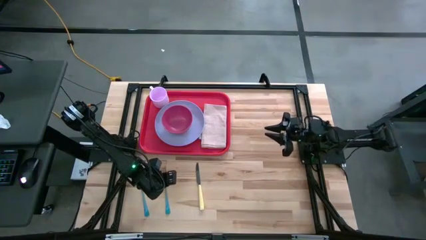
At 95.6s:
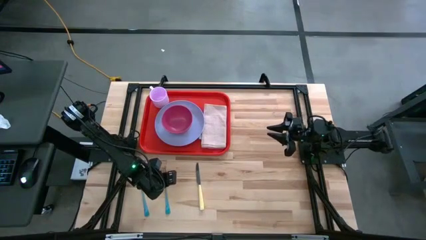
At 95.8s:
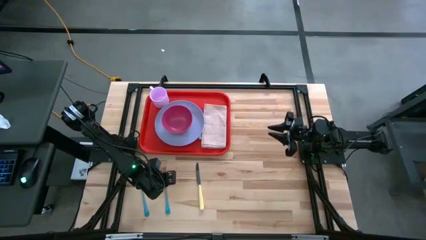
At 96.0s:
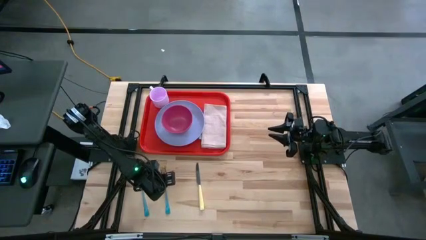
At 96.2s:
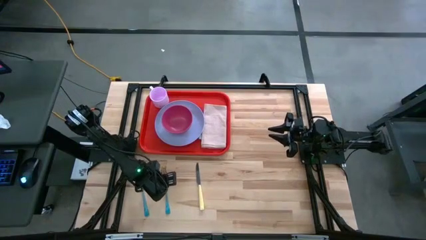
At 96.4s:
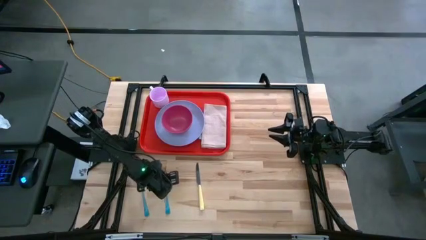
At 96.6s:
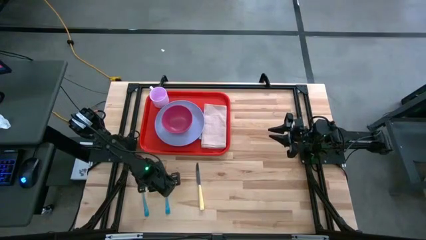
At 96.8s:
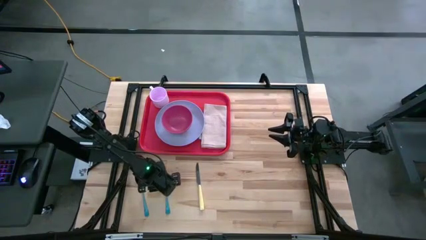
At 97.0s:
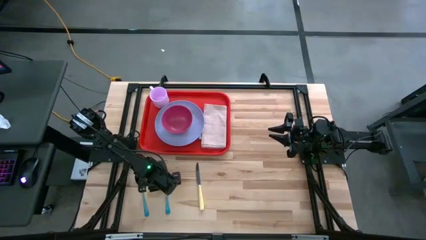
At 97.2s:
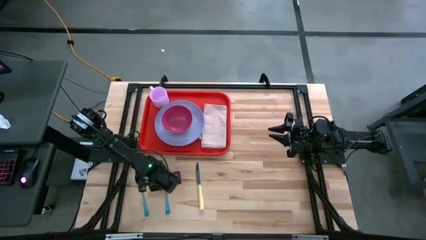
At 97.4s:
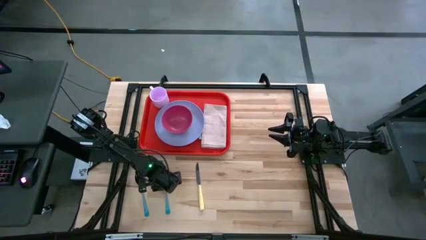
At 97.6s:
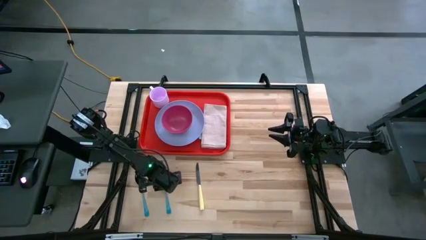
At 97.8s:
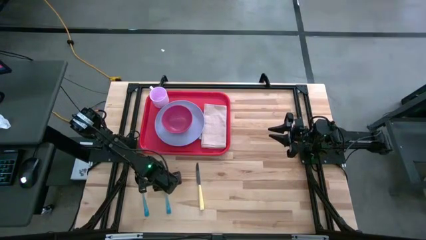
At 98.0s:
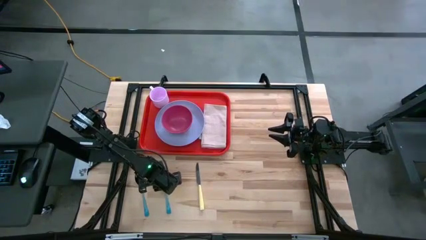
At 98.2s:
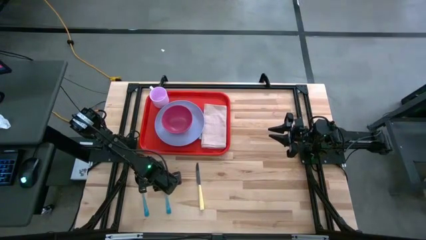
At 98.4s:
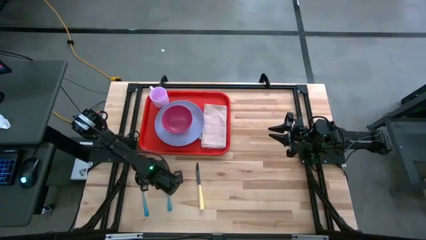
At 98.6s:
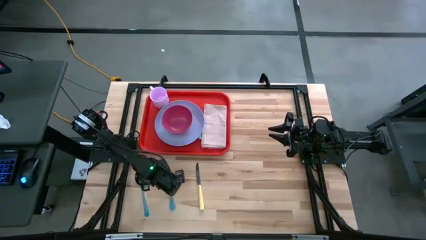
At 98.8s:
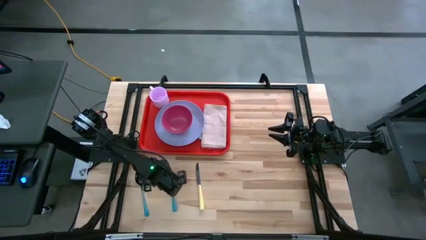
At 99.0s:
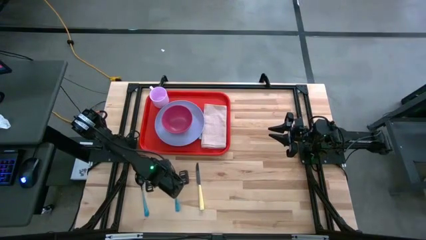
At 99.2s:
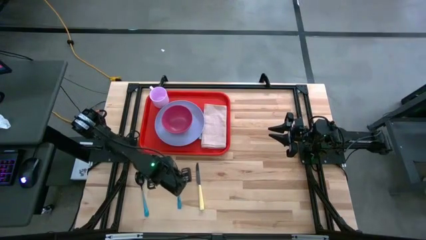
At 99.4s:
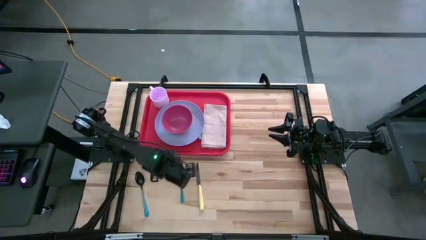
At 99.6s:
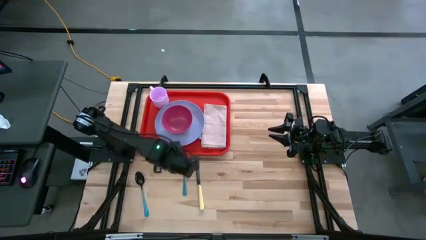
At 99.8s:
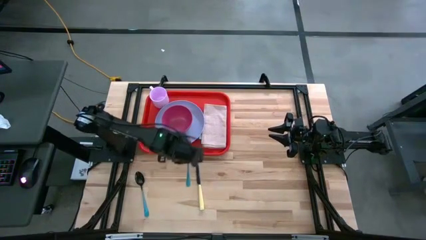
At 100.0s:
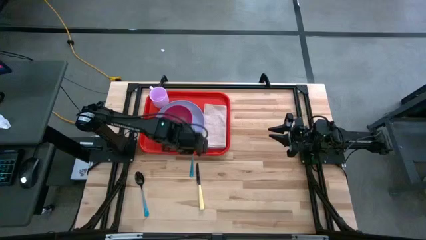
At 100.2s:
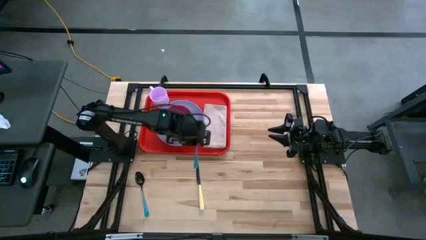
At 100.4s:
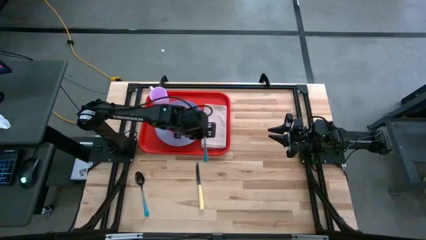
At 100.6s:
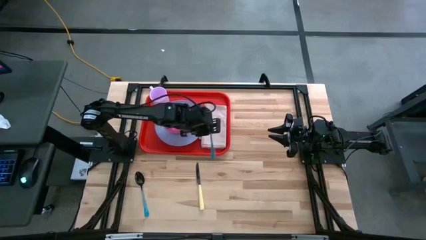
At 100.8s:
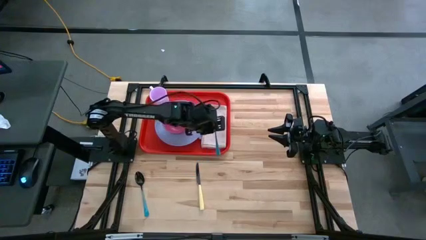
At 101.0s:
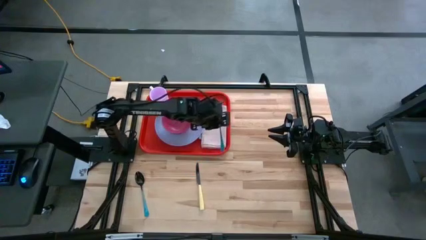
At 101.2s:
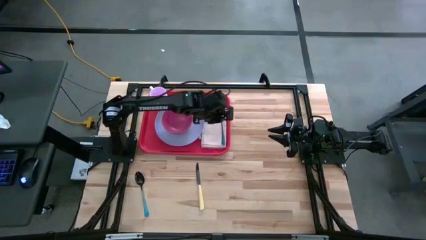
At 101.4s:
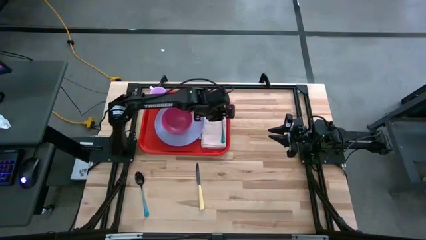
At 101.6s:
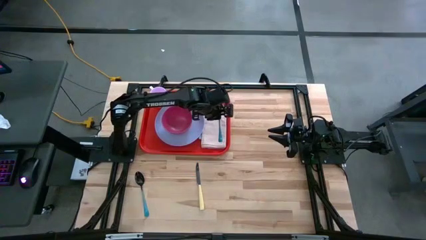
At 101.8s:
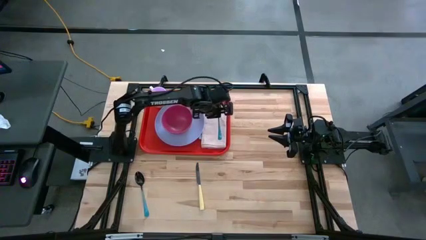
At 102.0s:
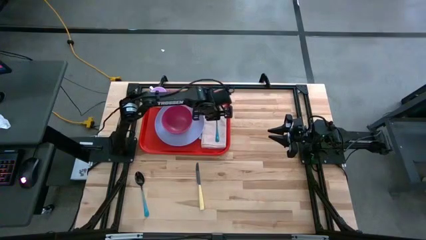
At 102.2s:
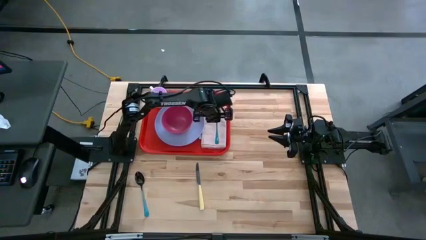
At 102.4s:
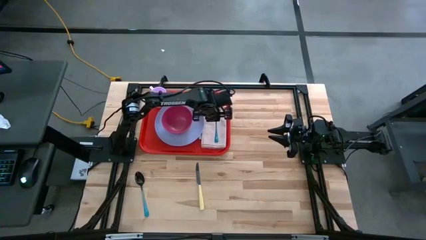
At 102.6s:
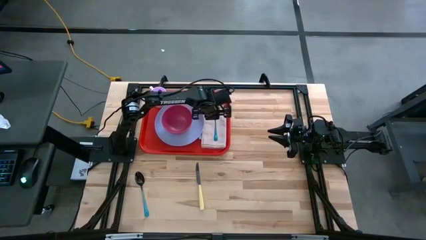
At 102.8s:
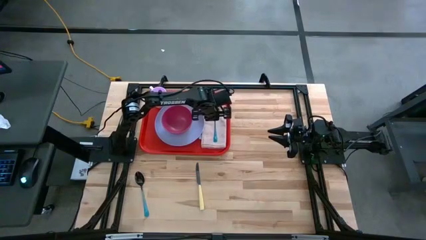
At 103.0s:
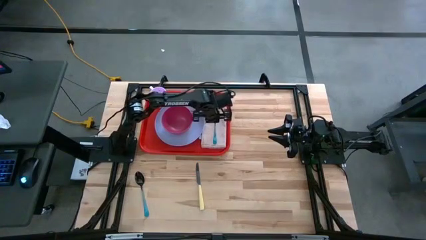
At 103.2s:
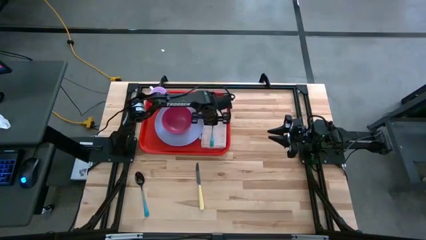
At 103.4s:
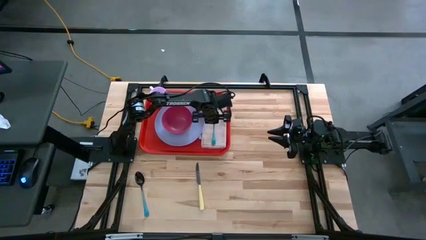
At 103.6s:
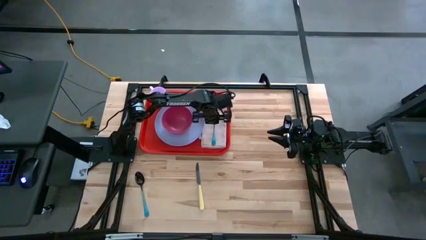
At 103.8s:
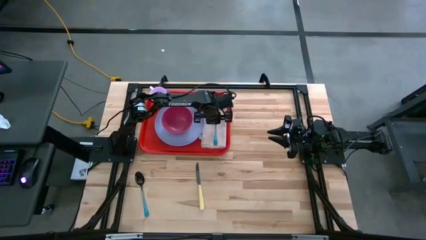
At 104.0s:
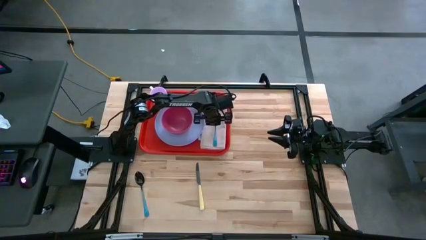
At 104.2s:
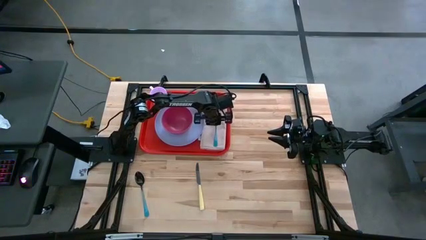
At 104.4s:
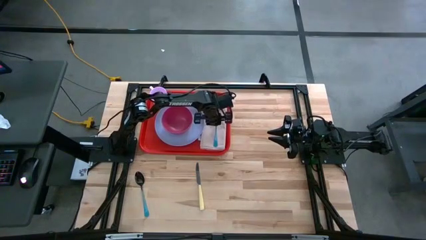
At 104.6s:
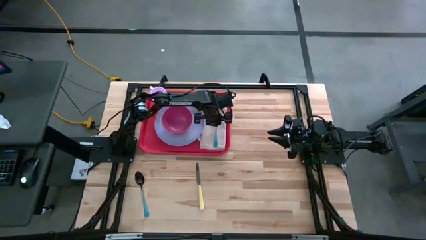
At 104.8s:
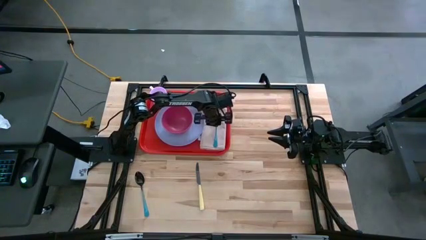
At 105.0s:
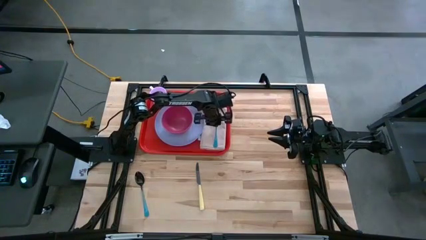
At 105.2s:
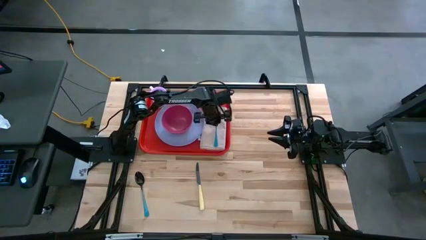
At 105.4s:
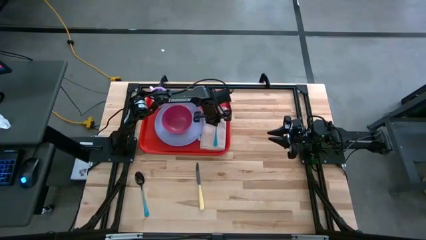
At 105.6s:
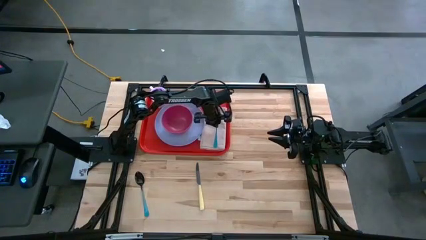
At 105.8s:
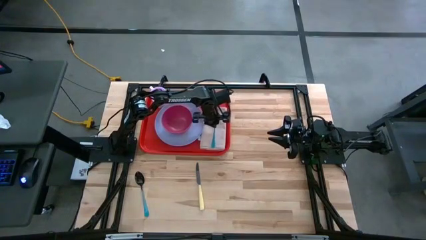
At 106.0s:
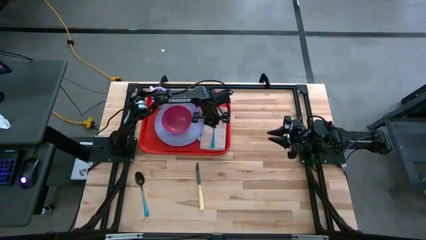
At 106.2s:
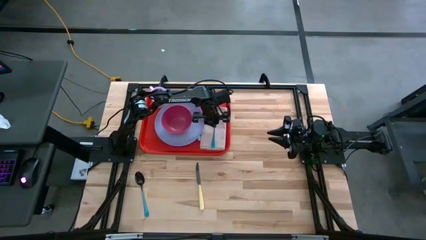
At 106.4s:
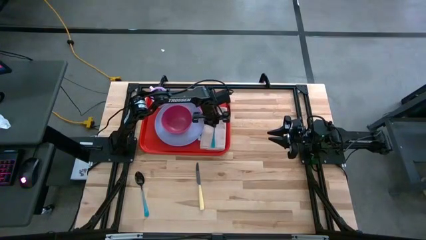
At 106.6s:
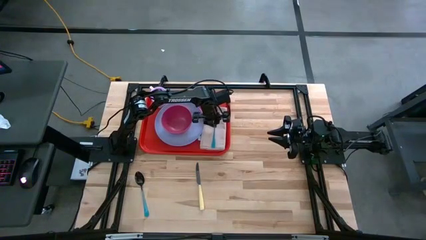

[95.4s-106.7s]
Task: Set up tray
Put the blue fork on top of the brown napkin on the right side of the violet plate on the red tray
